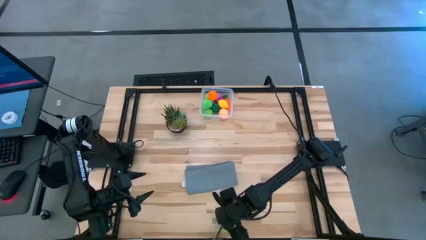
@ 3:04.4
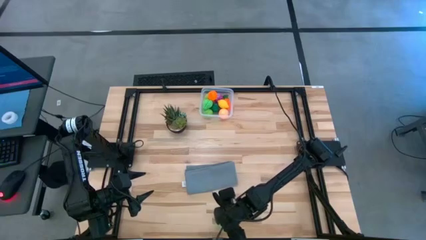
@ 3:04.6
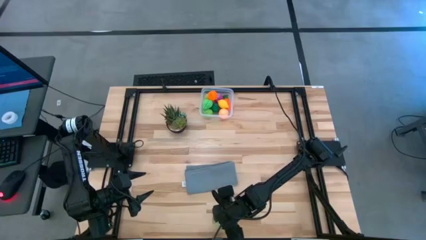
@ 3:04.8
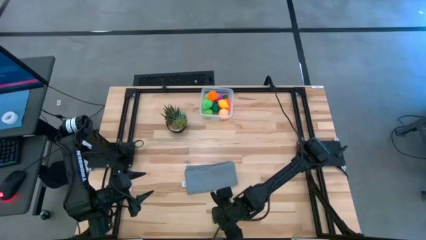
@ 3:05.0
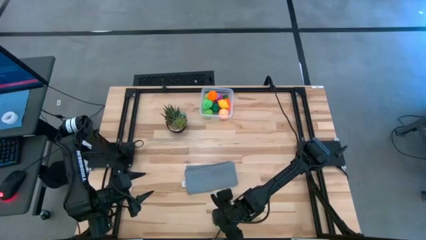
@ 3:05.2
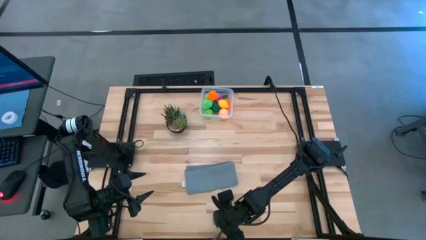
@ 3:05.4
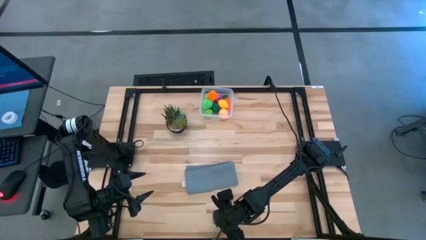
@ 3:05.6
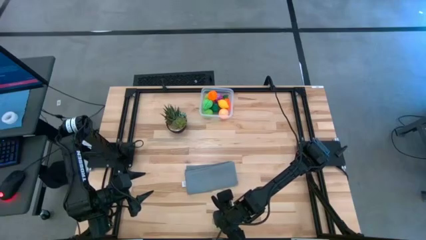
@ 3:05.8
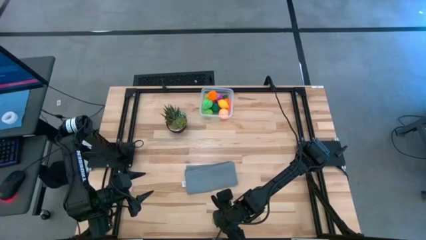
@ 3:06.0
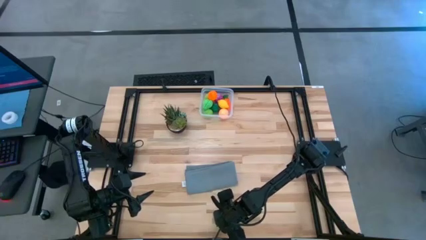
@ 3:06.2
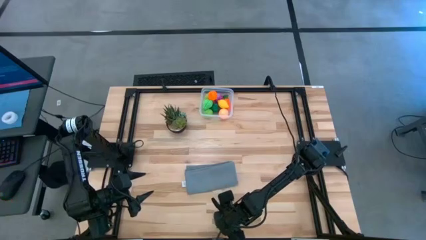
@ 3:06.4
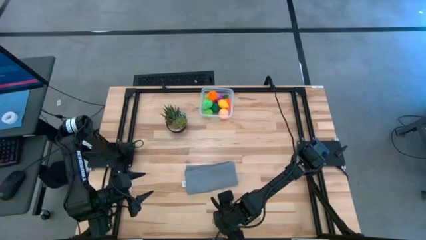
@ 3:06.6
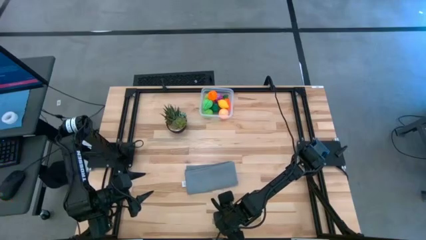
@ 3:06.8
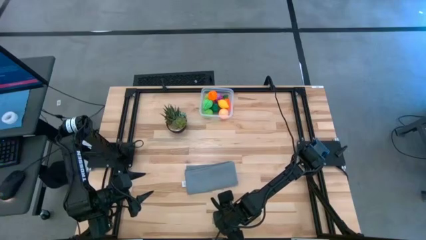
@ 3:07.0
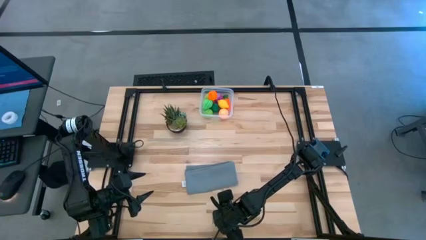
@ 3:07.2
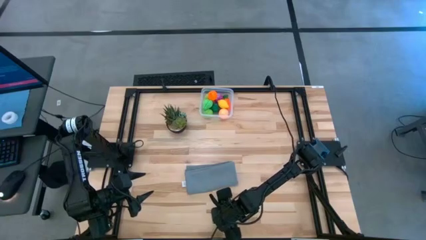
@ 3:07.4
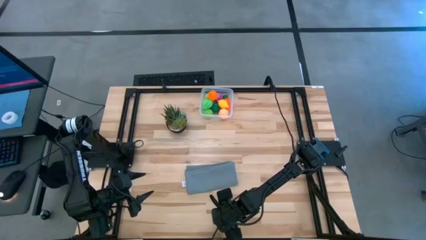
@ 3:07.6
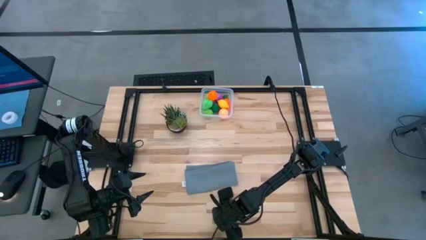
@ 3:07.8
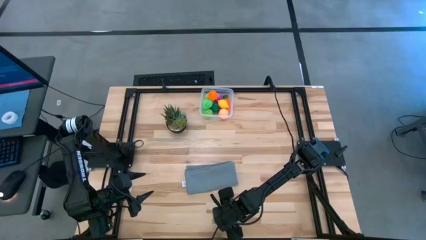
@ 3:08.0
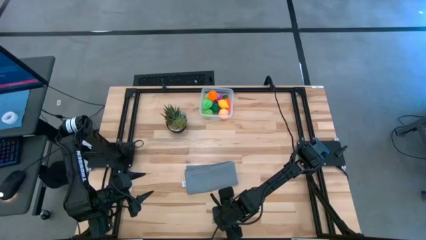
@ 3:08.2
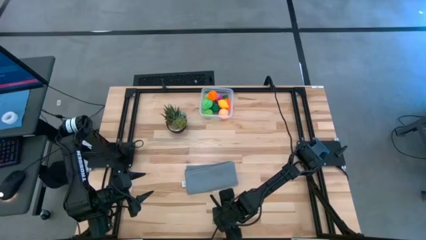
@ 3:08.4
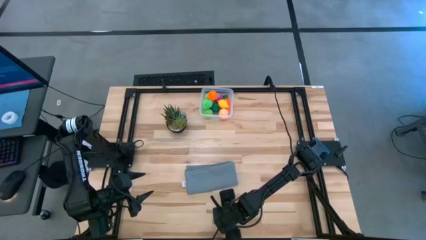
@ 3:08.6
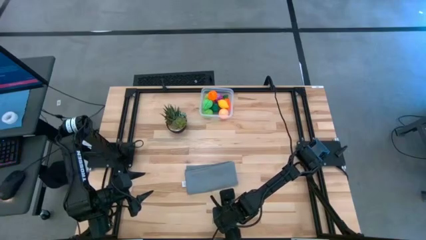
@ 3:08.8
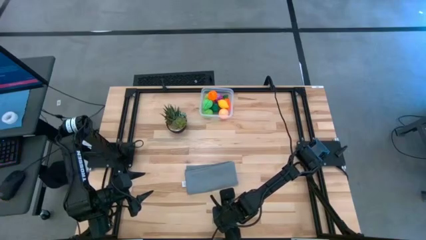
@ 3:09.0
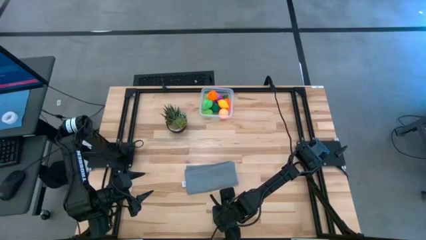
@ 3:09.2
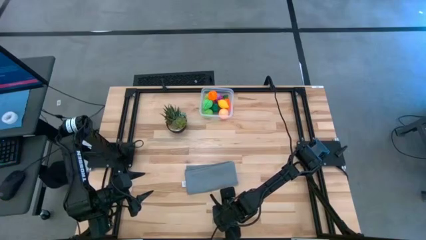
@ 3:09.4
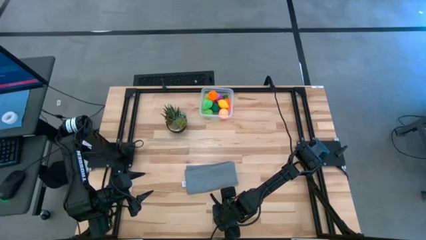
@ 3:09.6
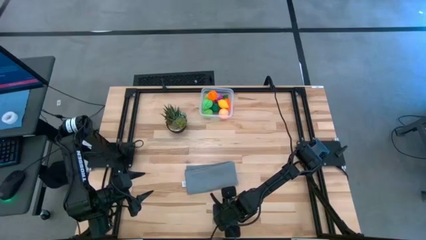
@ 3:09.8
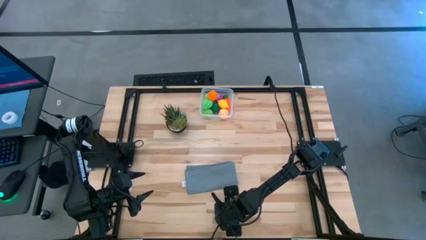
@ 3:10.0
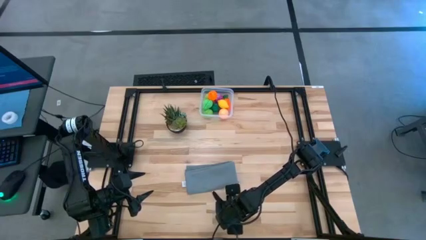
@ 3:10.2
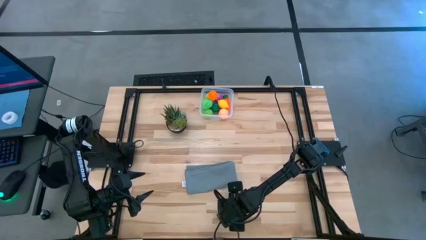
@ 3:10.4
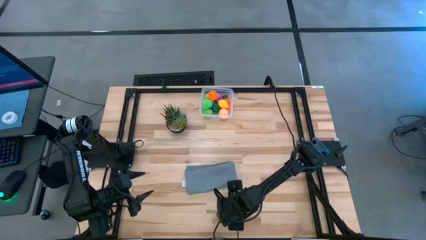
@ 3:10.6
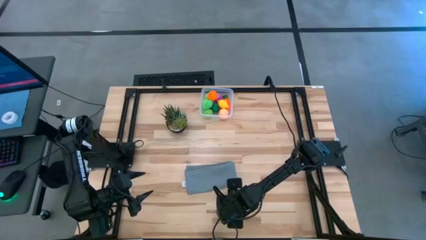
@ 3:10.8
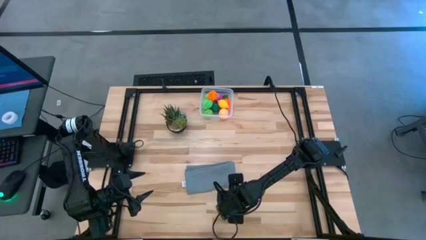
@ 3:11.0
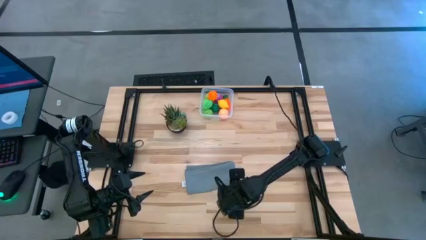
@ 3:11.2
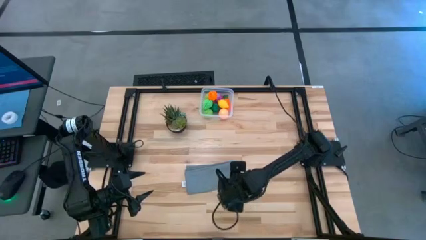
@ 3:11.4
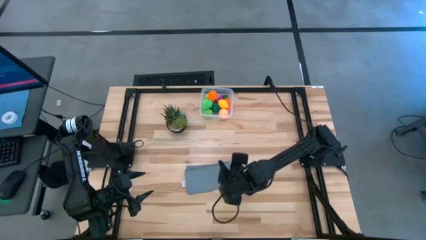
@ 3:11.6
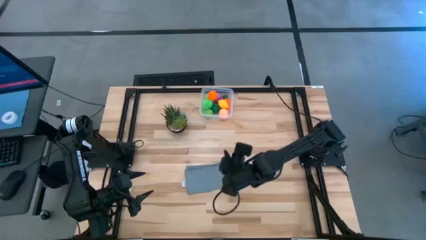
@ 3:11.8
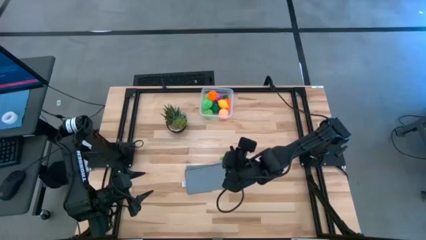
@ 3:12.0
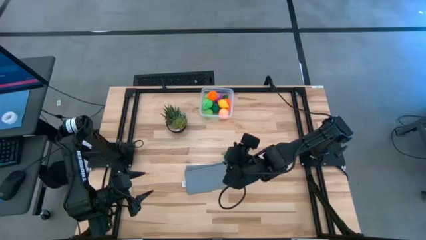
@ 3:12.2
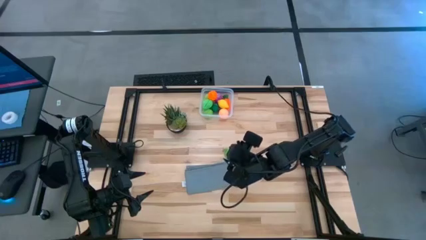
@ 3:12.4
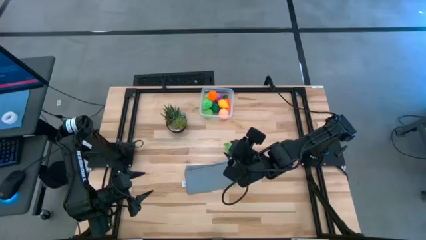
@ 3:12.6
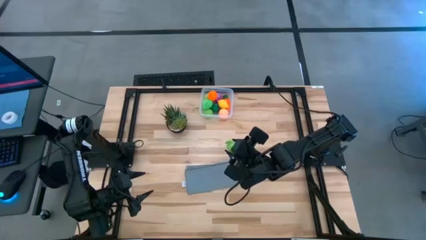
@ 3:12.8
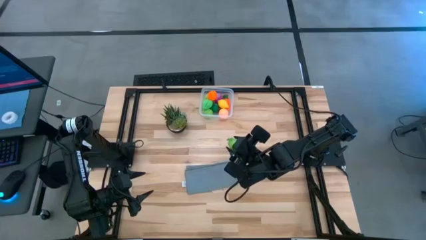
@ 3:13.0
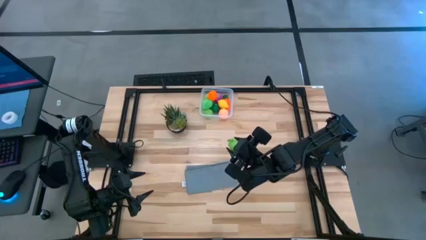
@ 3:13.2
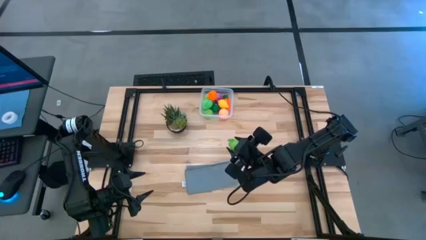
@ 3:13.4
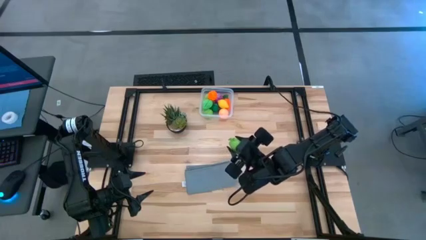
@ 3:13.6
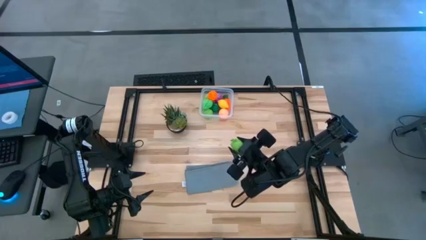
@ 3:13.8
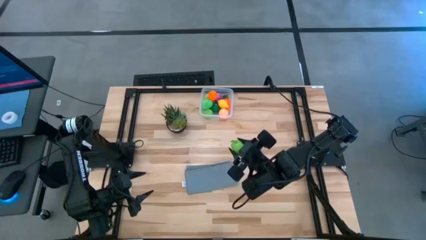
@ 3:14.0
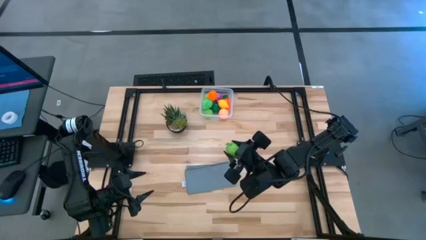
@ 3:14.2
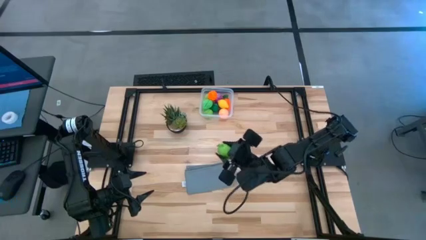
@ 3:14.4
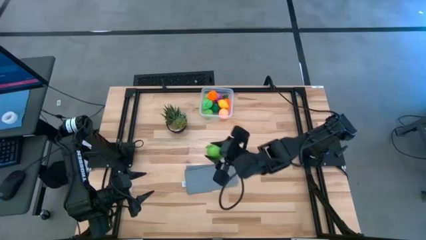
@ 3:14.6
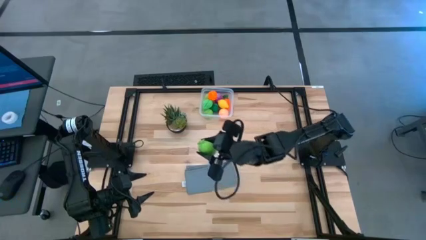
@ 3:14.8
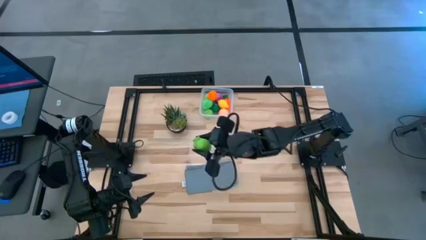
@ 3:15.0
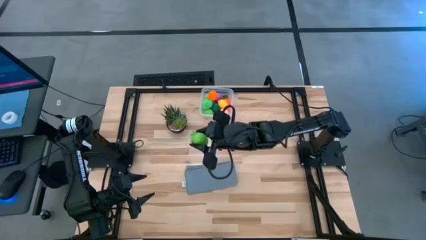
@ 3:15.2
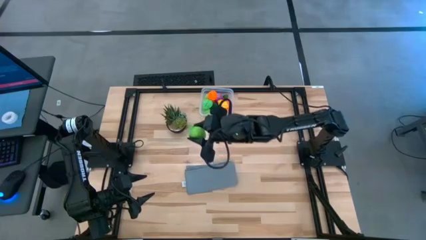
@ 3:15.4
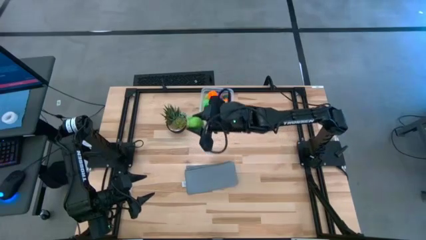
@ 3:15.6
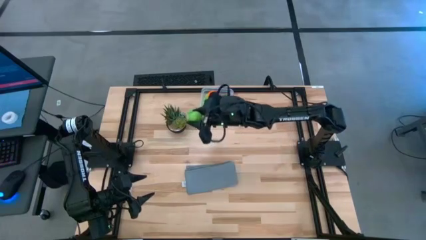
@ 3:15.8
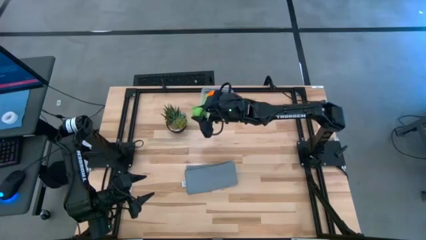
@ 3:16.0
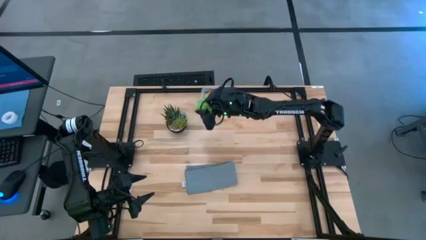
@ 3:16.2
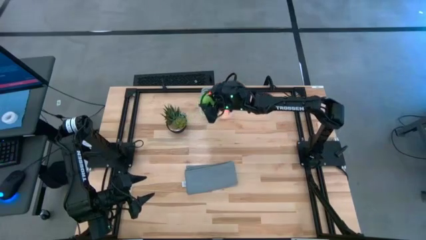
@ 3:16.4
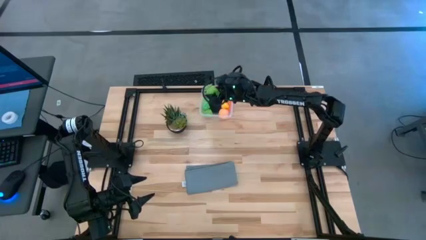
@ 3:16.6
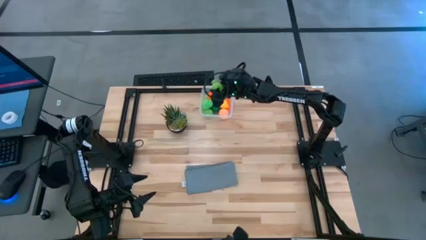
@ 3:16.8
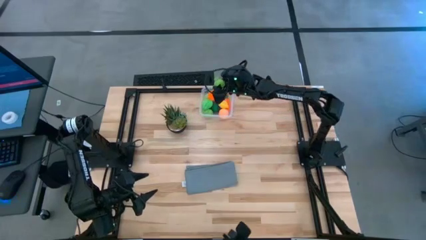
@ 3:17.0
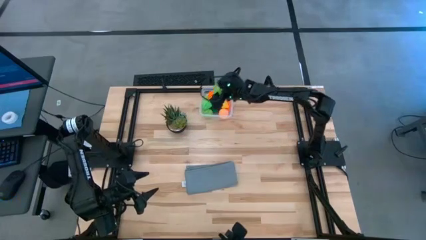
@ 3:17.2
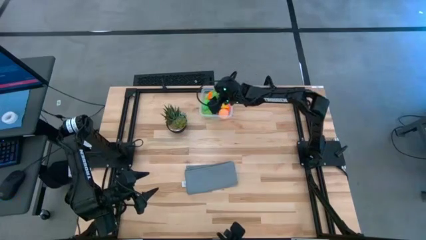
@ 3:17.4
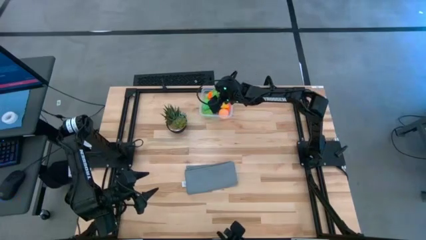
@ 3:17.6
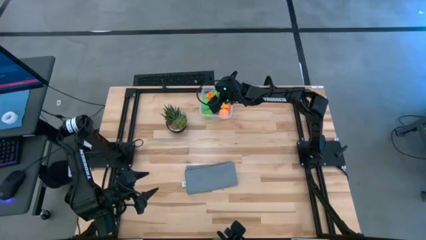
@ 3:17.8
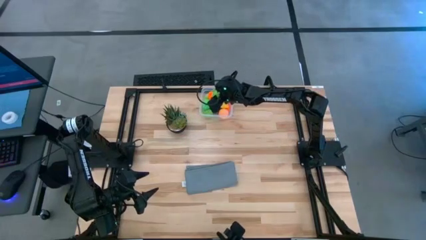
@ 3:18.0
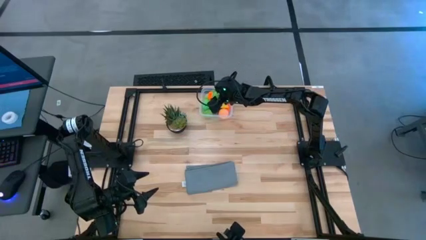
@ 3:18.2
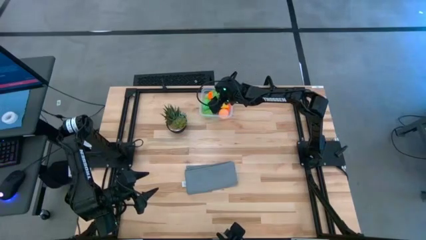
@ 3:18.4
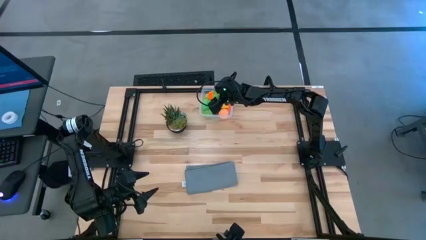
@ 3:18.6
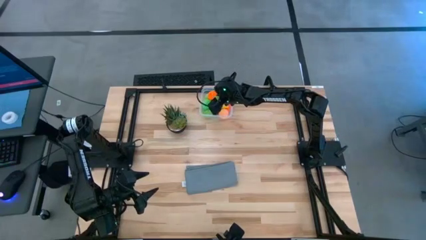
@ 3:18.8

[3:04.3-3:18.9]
Task: Pick and placing Produce into tupperware
Put the melon into the bin

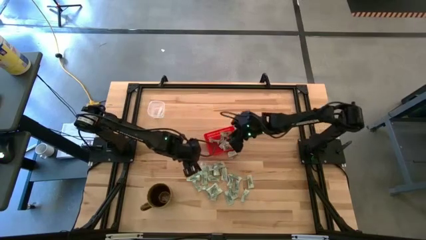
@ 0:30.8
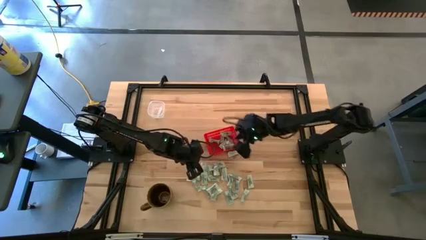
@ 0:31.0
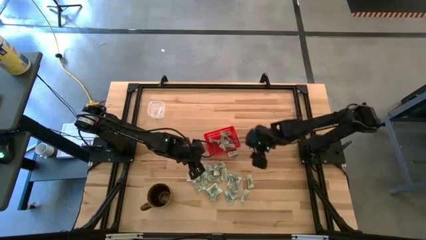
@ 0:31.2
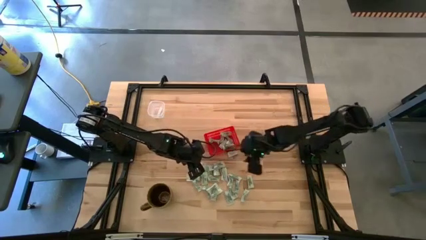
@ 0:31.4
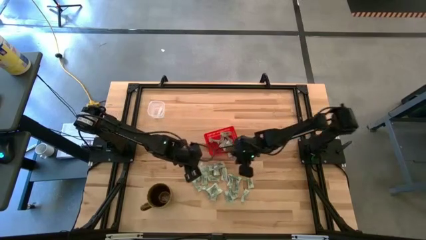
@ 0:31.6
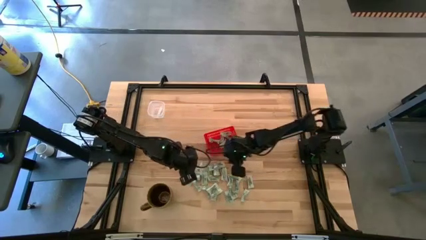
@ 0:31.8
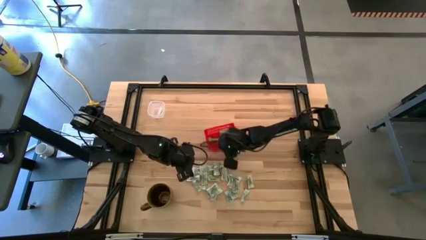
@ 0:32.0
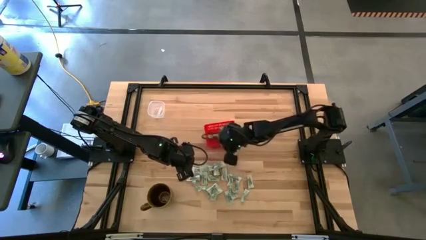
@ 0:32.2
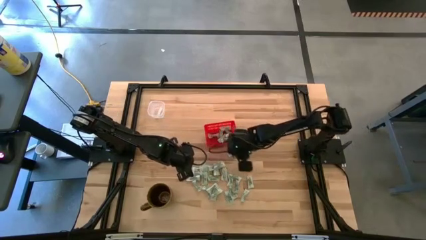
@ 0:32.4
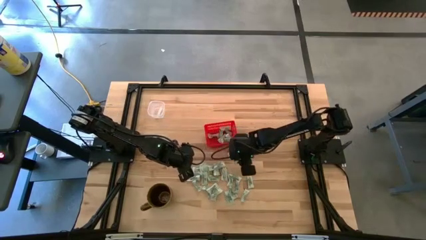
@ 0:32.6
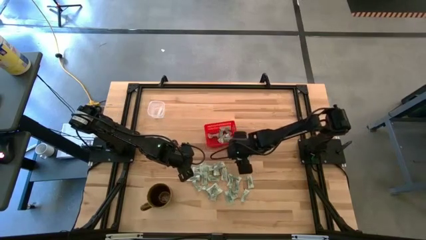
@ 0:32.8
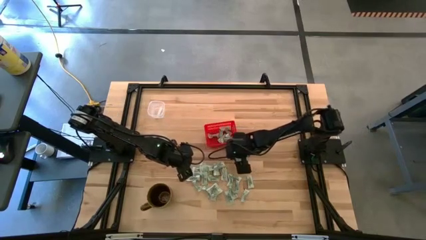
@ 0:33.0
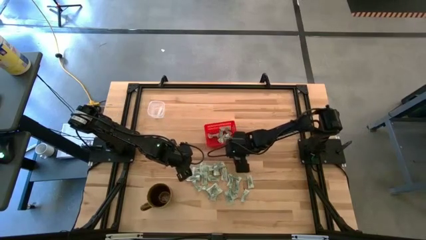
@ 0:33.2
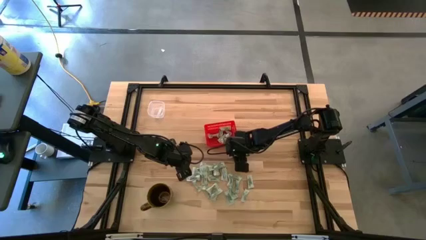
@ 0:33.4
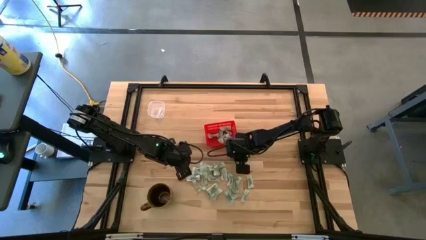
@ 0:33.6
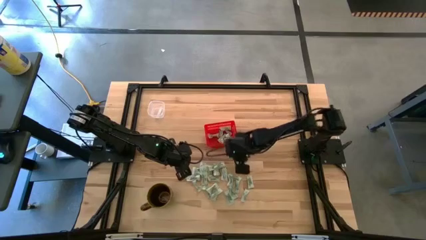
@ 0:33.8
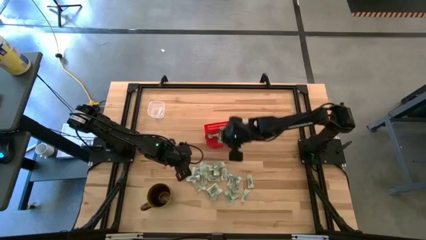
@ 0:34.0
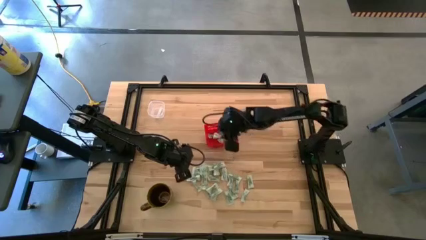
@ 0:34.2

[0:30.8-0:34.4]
Task: Pick and place items into bin
Put the white truvia packet into the red bin
